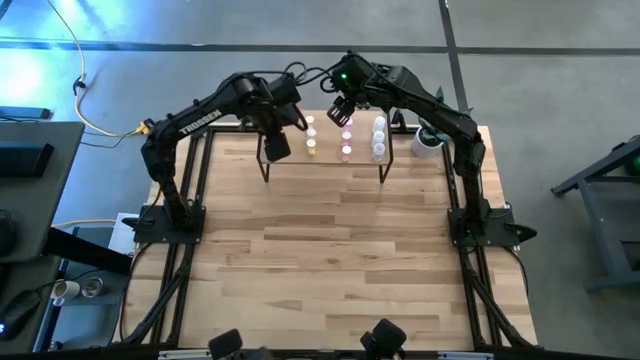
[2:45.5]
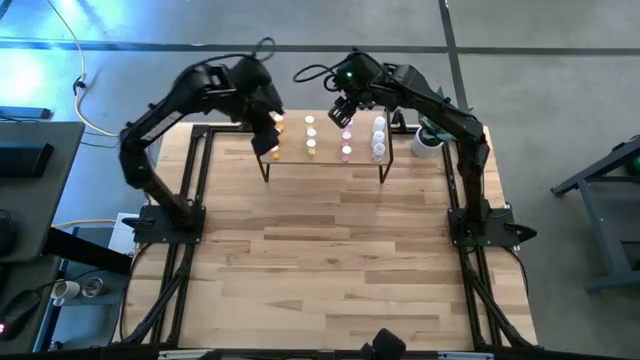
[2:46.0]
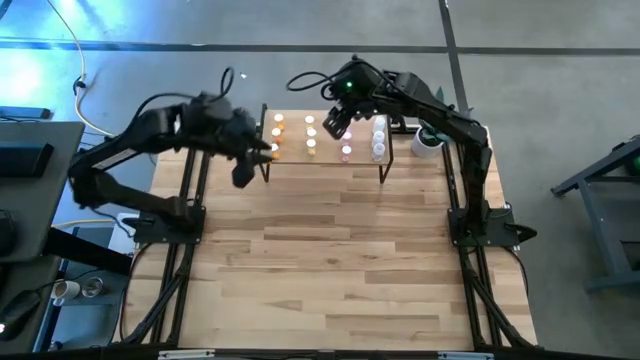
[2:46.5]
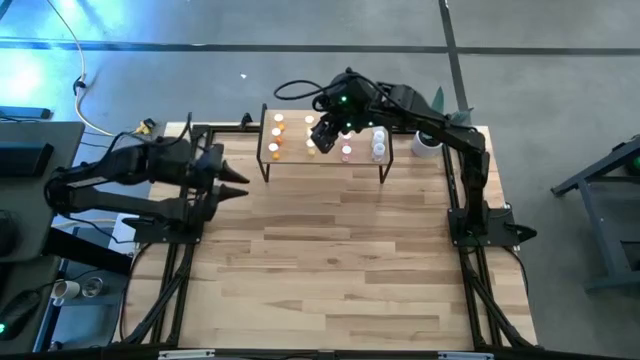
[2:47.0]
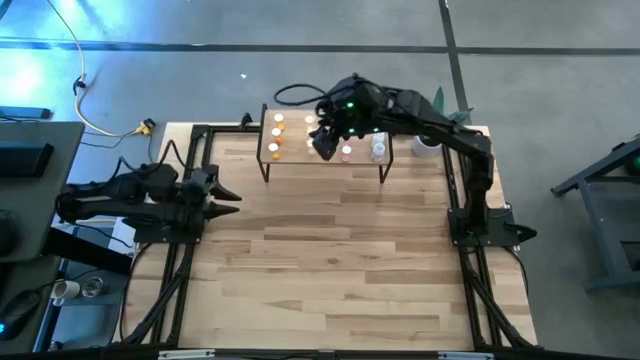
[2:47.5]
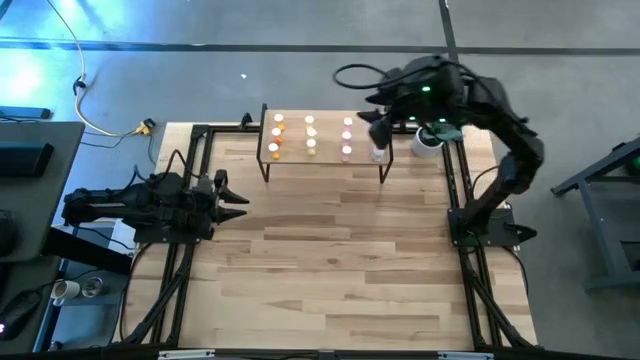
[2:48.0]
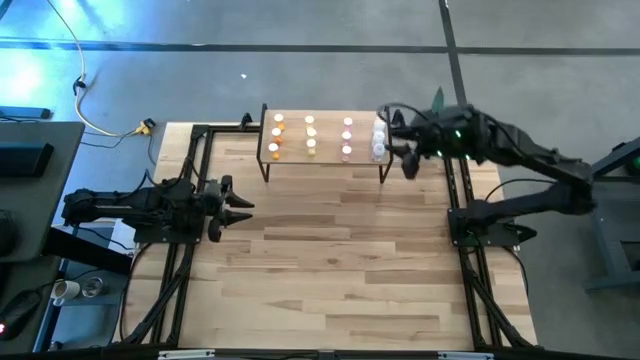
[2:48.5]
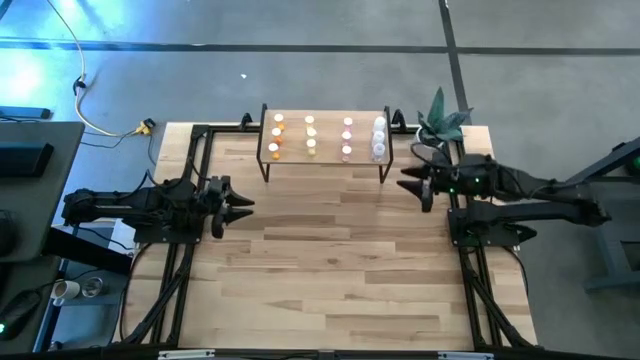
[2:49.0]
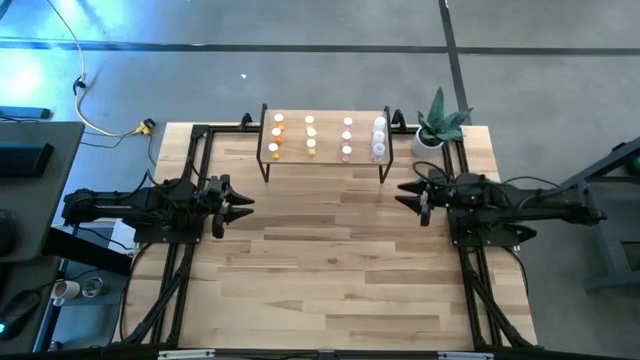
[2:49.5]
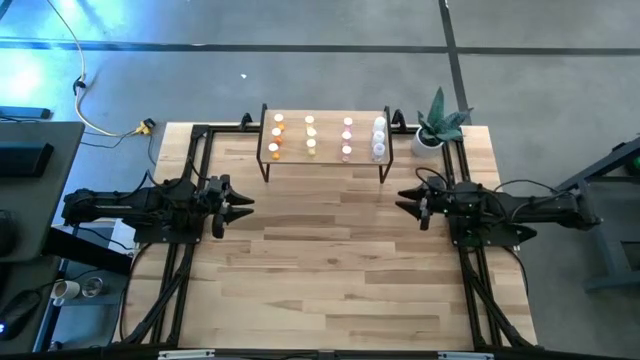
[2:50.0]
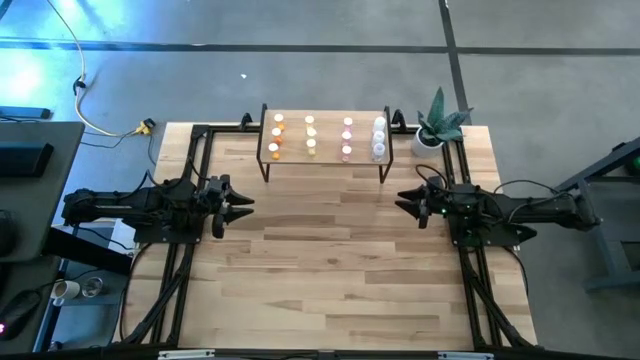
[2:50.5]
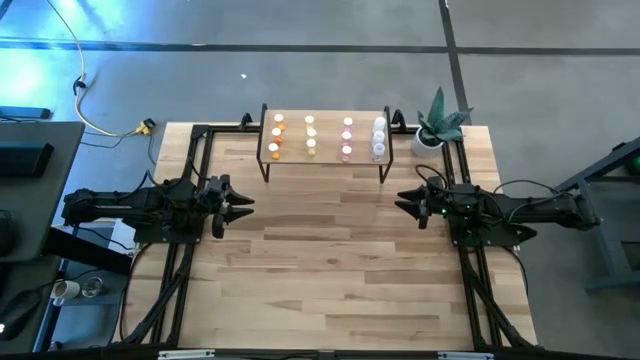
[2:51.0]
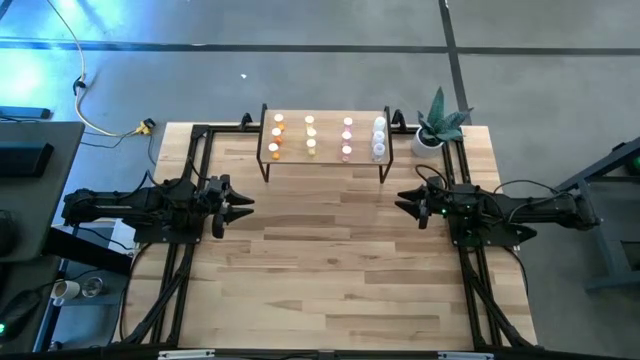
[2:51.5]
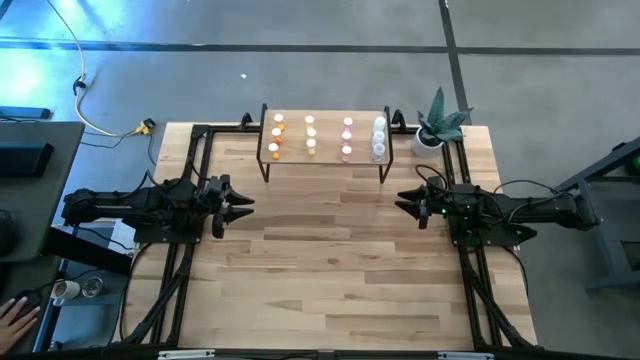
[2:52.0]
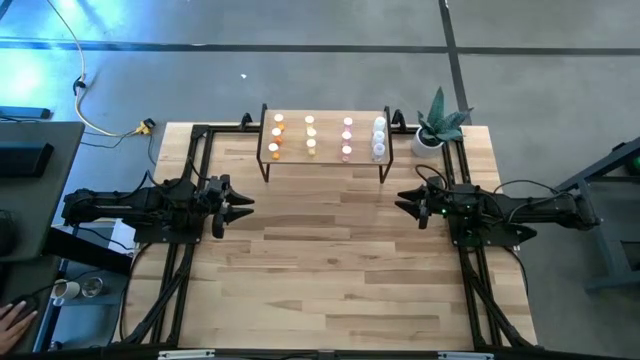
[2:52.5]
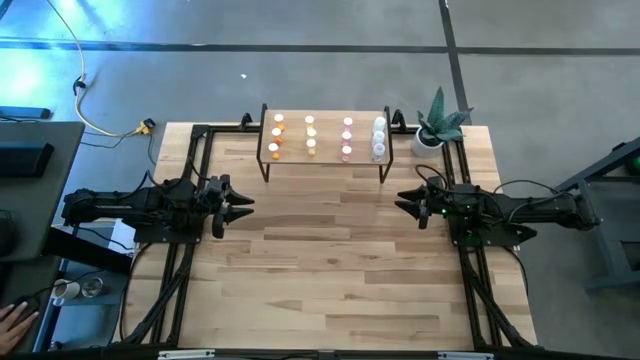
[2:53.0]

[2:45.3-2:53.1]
Task: Pick and place medicine bottles onto shelf by color
Return to Home Position

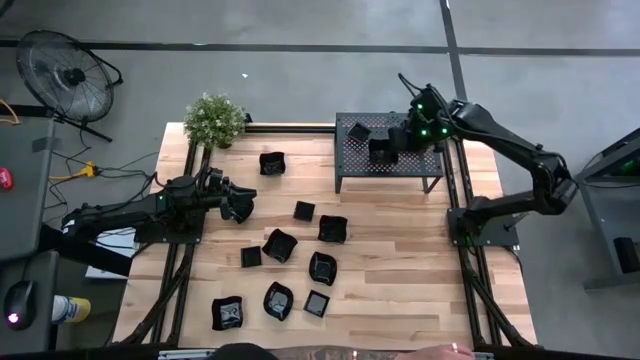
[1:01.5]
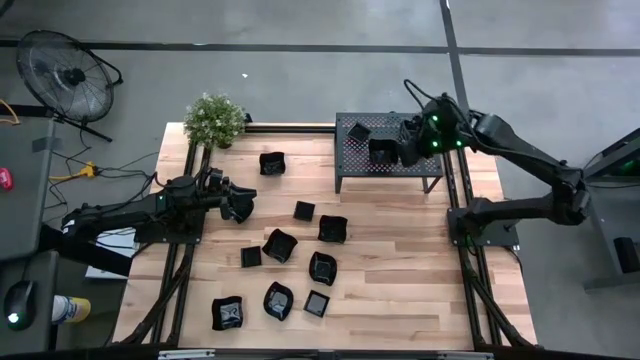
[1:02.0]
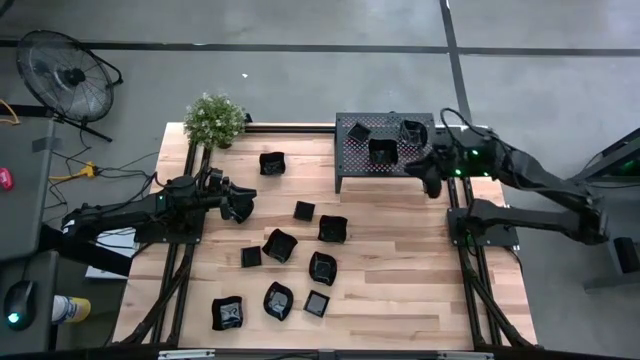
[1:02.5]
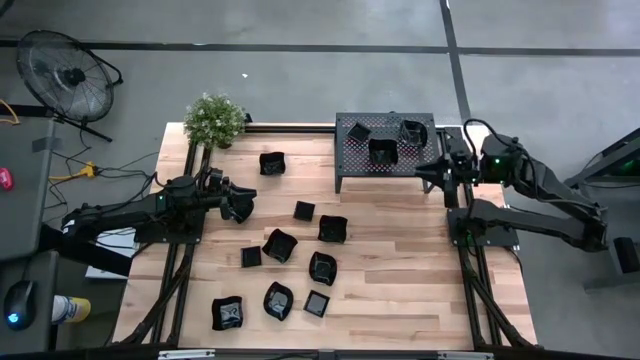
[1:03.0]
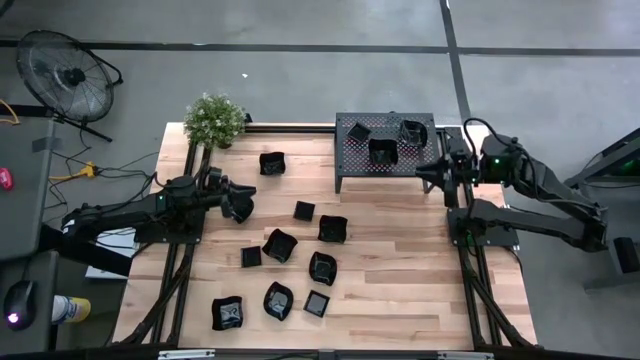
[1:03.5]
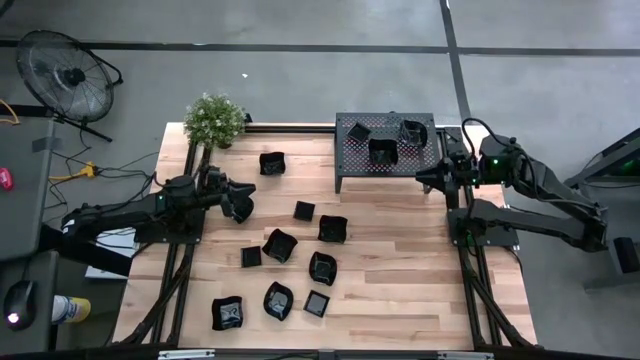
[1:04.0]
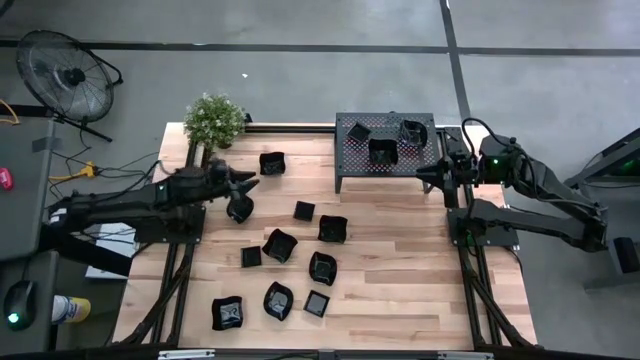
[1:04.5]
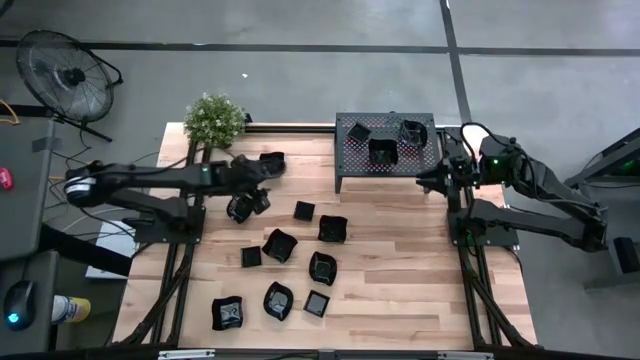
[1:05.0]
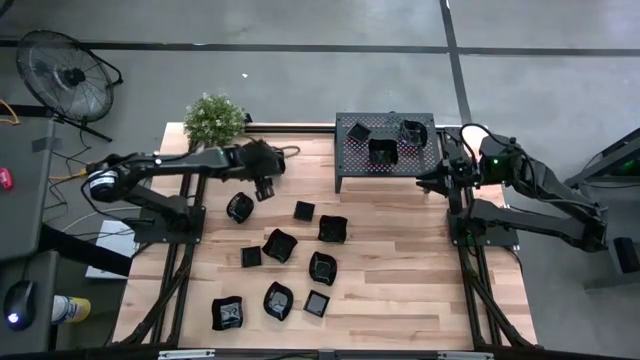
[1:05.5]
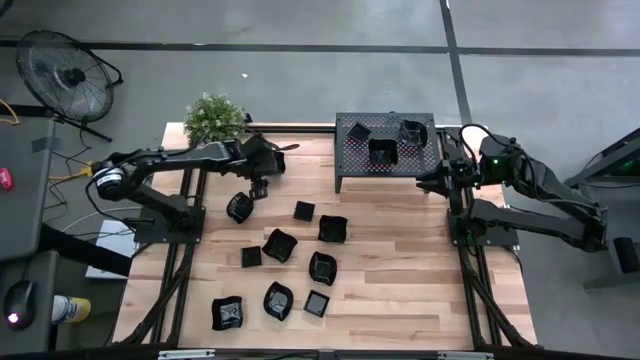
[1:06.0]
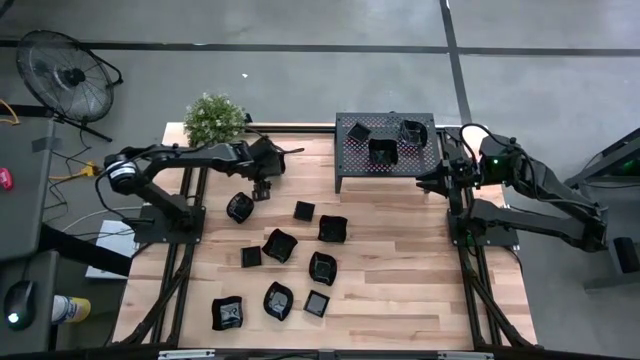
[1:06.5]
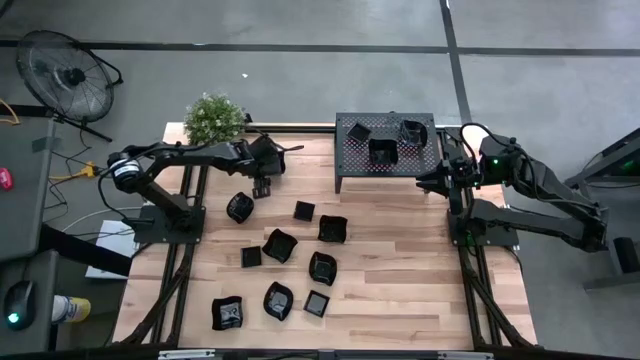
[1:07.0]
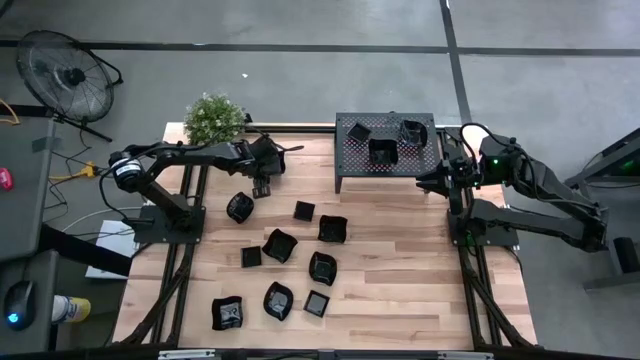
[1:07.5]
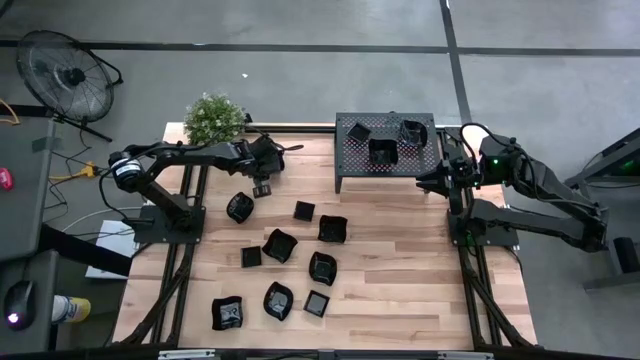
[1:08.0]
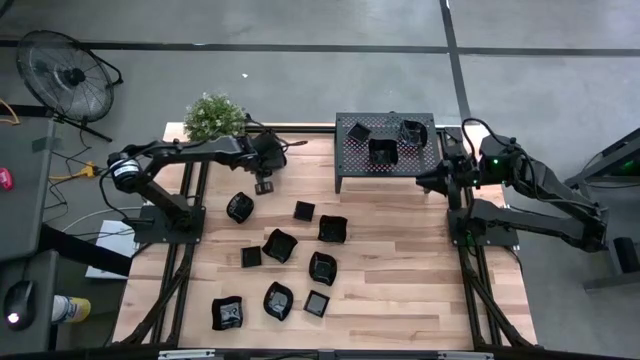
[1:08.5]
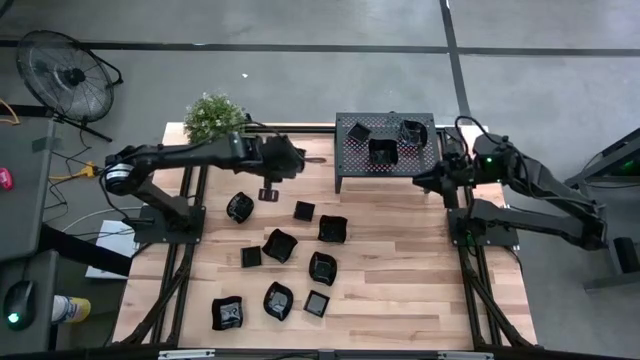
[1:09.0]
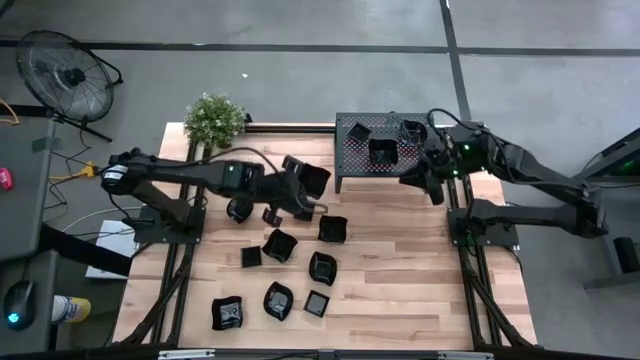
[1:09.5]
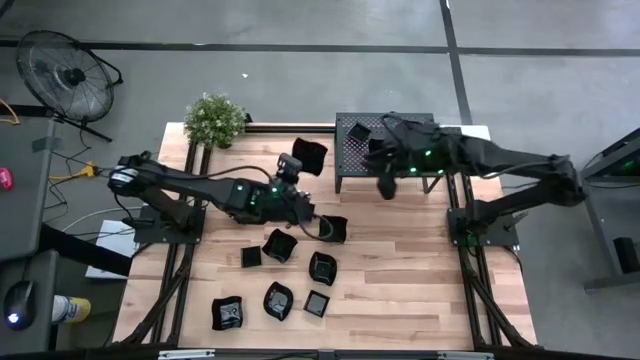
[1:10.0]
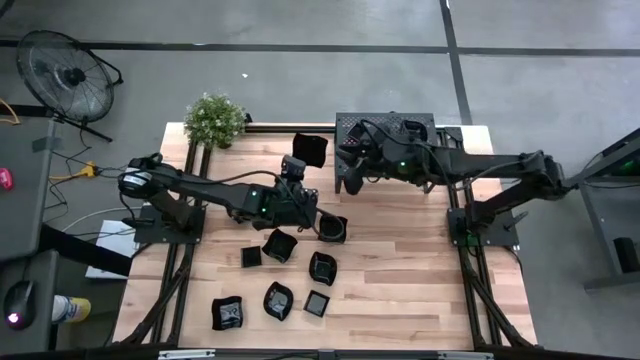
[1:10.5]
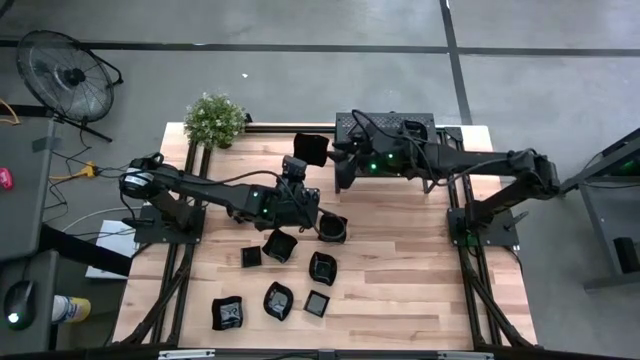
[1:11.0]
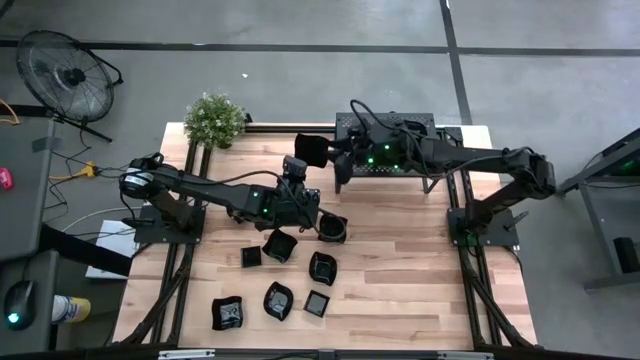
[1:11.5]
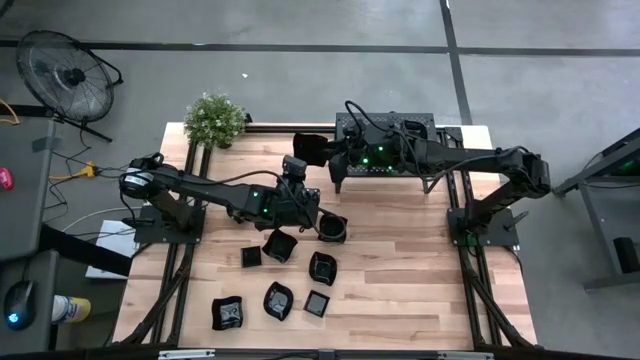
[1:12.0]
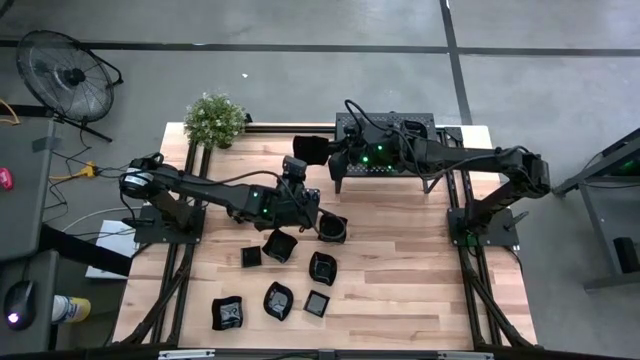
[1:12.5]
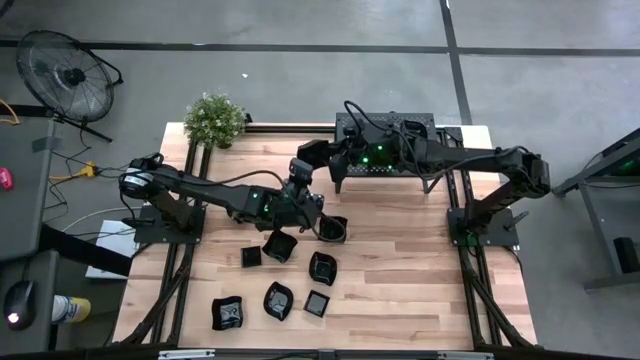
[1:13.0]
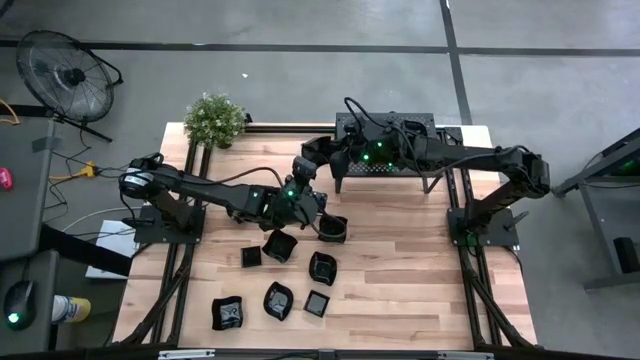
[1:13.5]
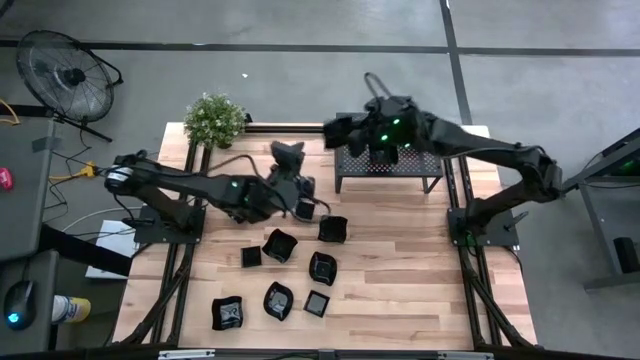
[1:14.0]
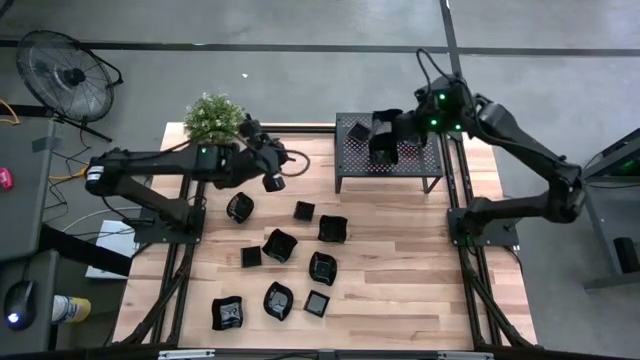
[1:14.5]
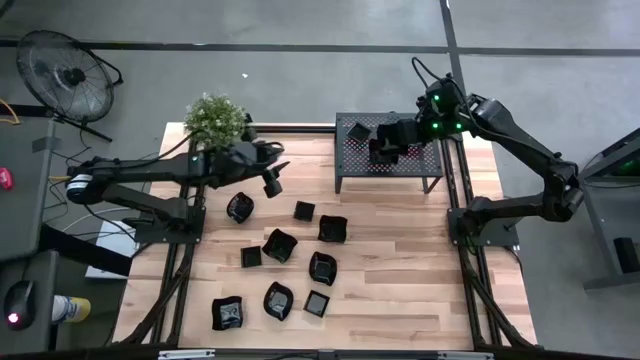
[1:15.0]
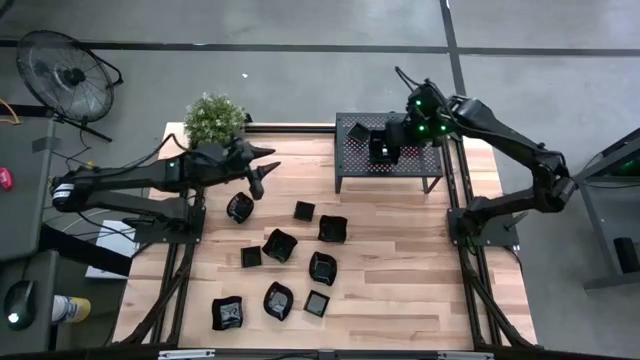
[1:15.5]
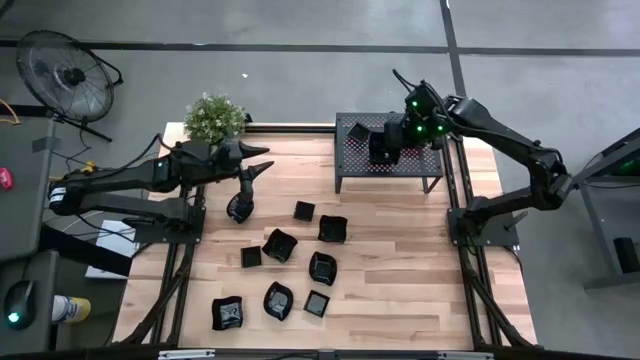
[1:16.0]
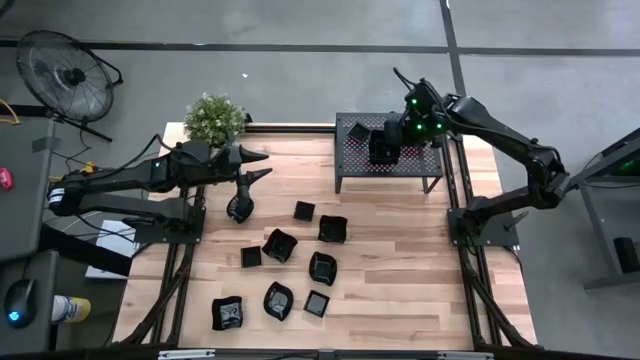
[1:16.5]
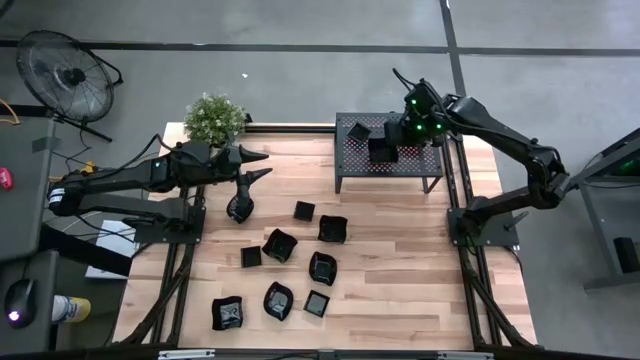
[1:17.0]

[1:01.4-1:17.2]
Task: Pick & Place Mini shaped plates
Stack the black distorted square plate on top of the black distorted square plate on the shelf
